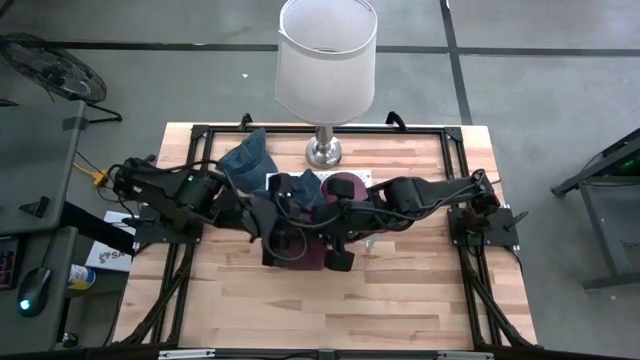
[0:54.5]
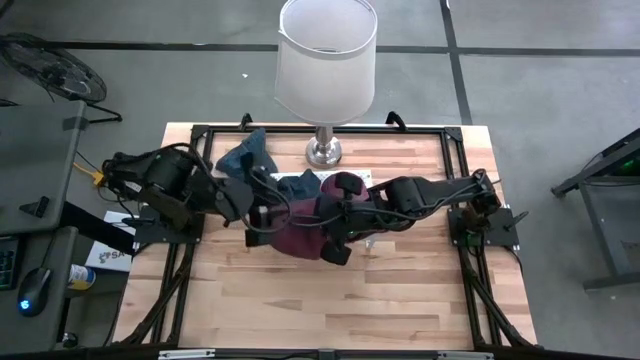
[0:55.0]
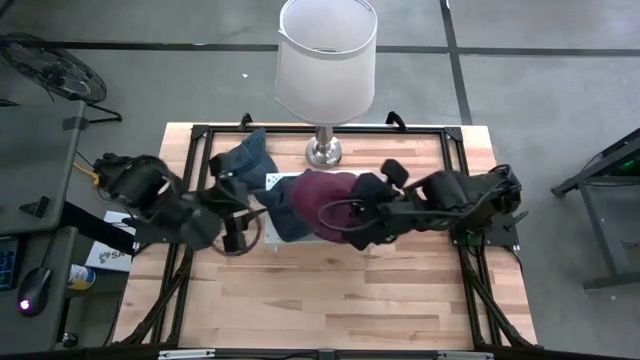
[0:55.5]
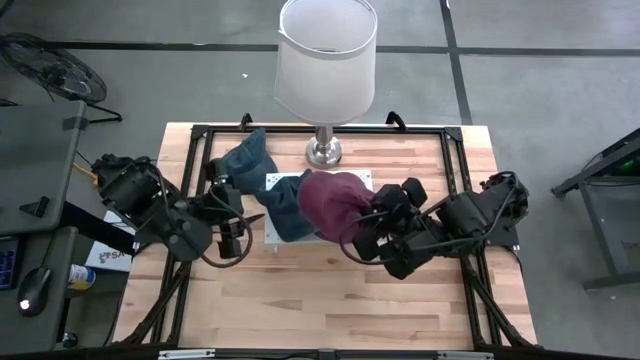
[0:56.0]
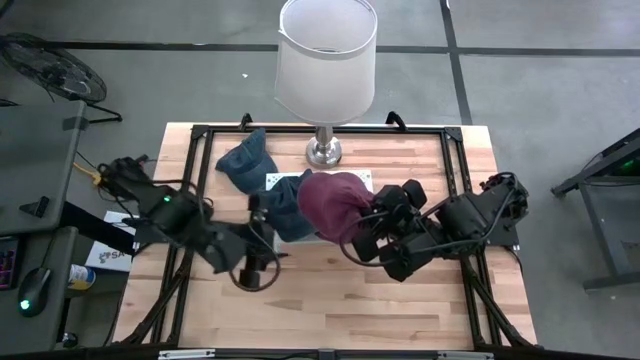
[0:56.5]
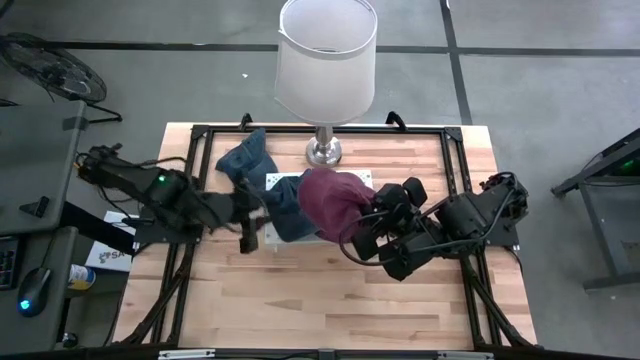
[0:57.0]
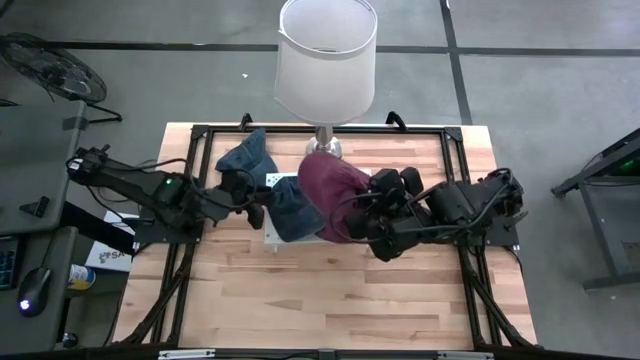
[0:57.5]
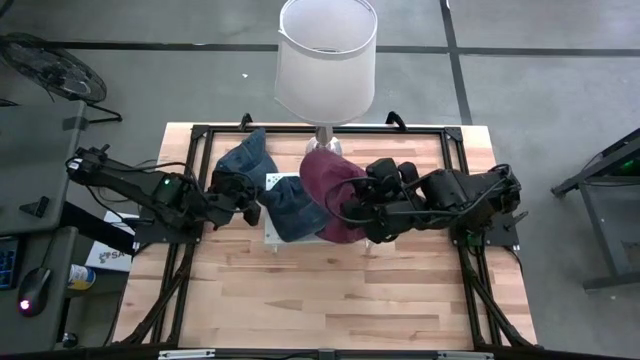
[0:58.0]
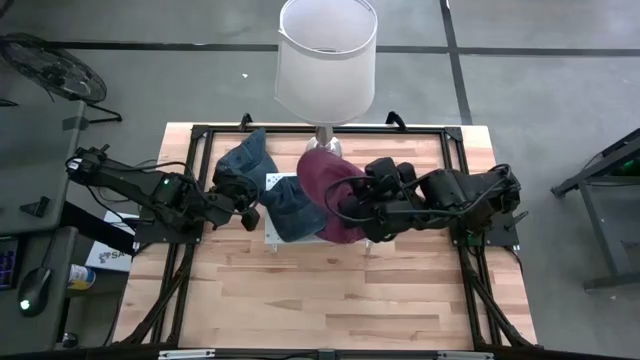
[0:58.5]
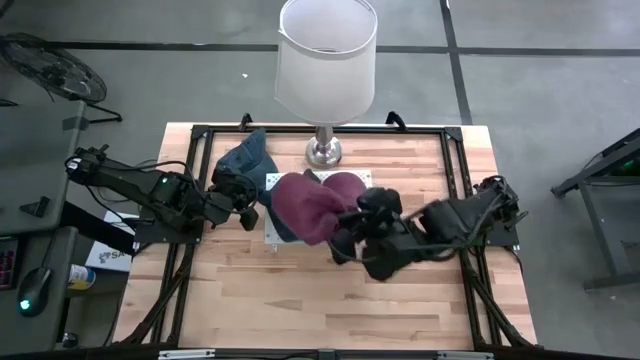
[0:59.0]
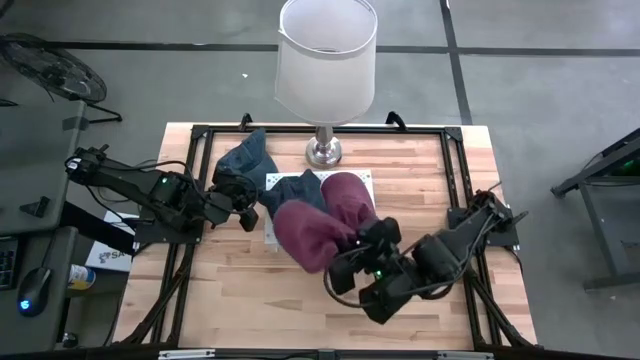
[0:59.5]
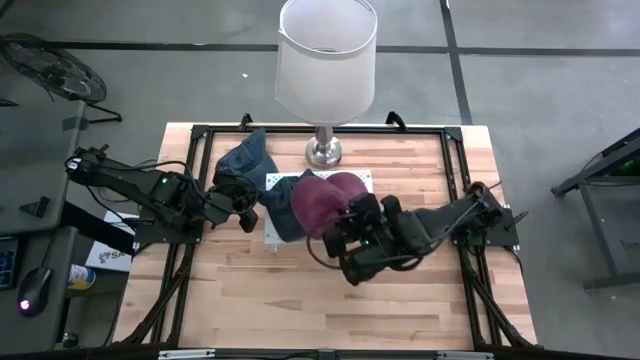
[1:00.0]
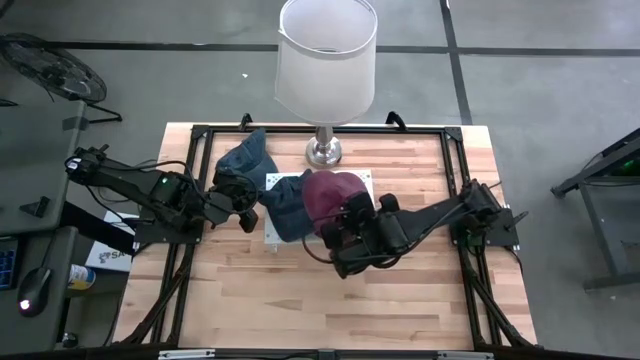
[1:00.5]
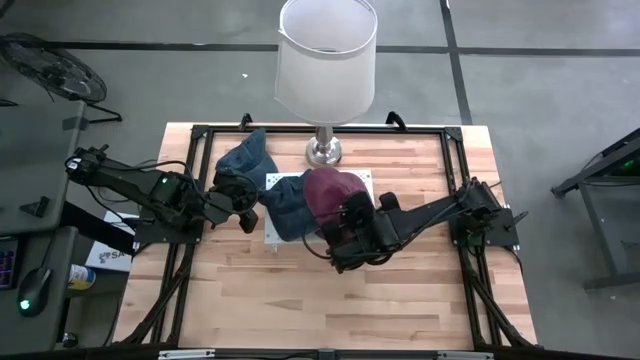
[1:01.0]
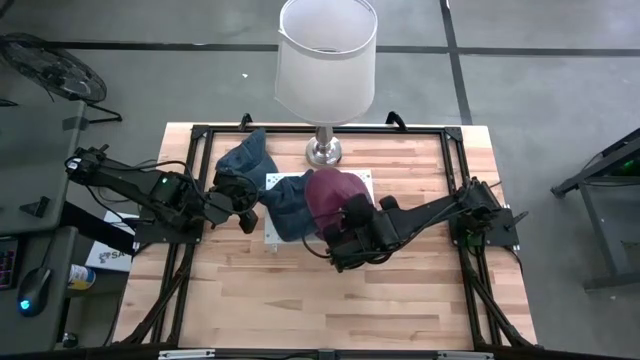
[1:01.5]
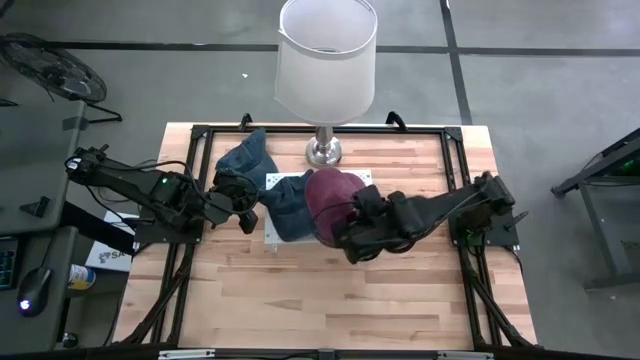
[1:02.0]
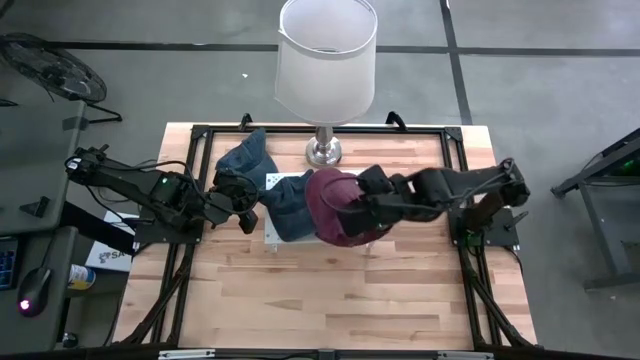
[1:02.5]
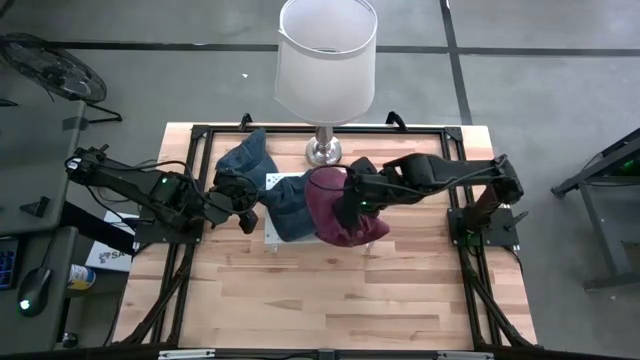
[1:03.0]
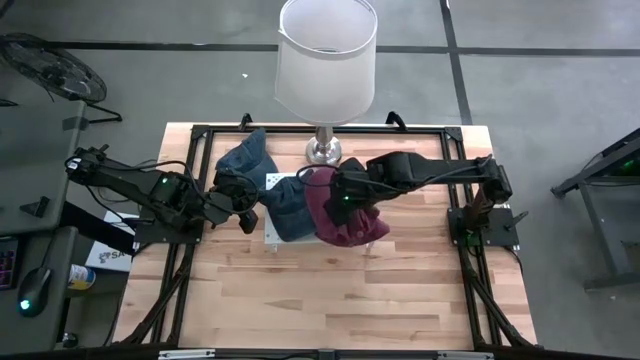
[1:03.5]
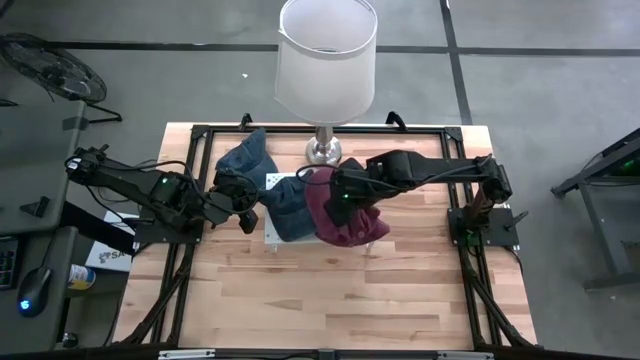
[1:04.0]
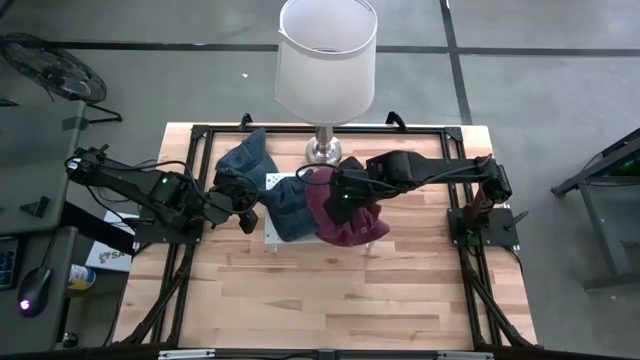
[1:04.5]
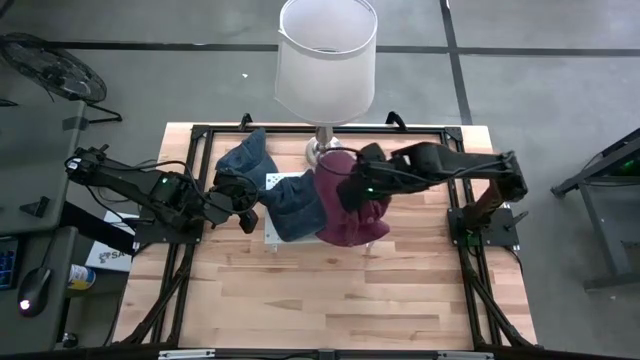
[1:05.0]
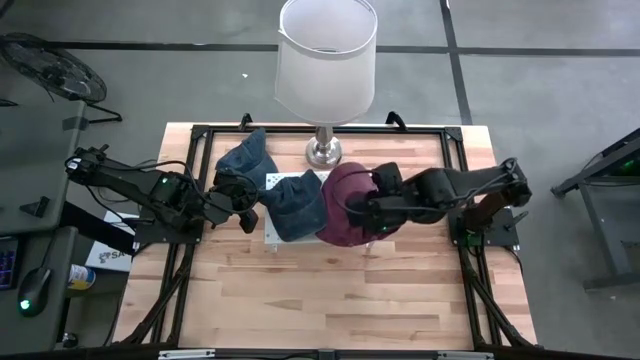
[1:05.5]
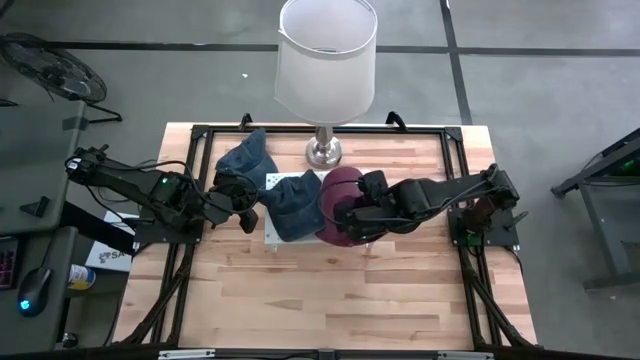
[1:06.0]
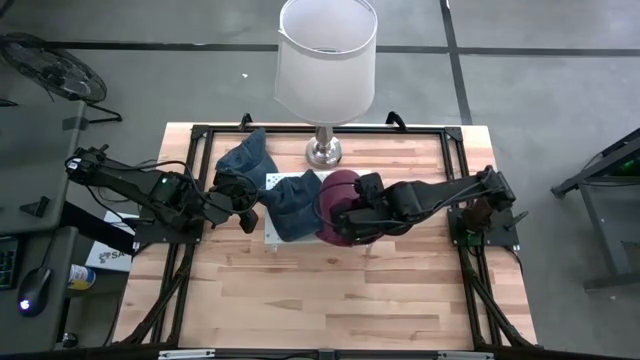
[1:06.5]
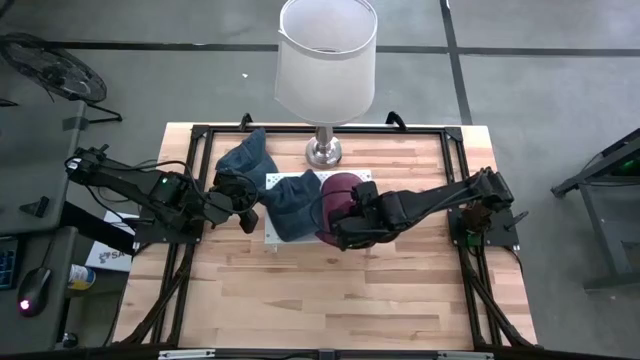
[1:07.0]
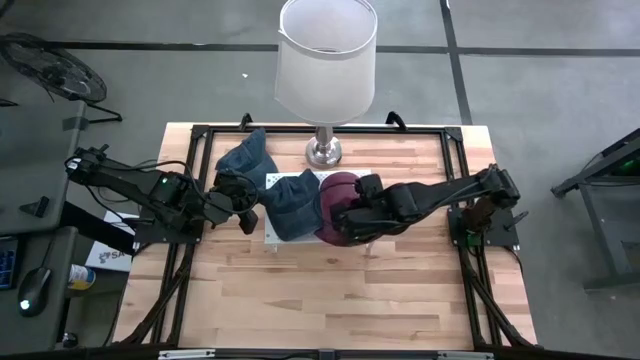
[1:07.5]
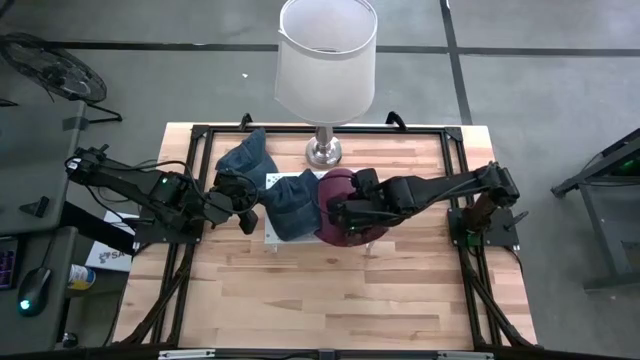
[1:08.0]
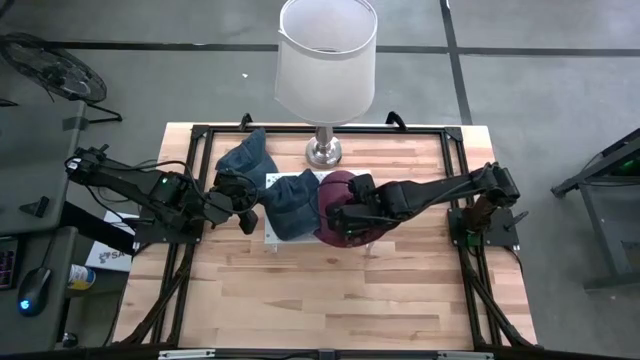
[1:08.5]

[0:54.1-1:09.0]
Task: Pick & Place hat
Stack the red cap on top of the other red cap on the shelf

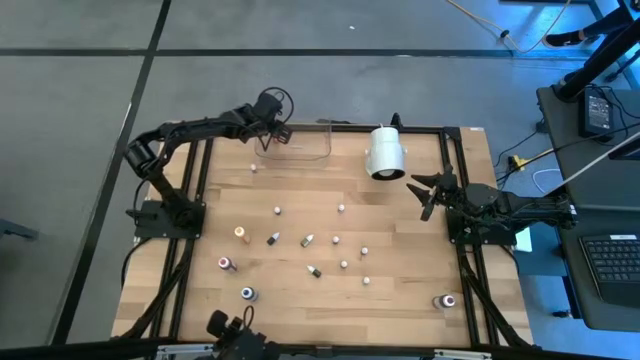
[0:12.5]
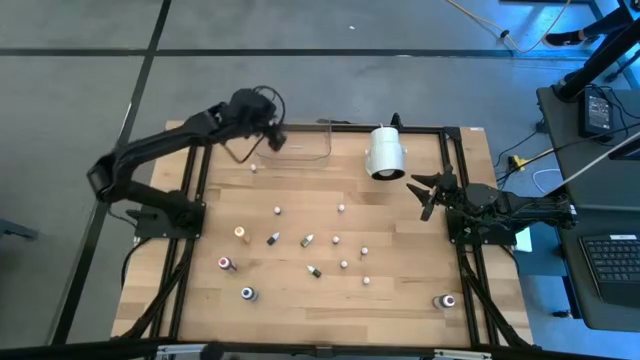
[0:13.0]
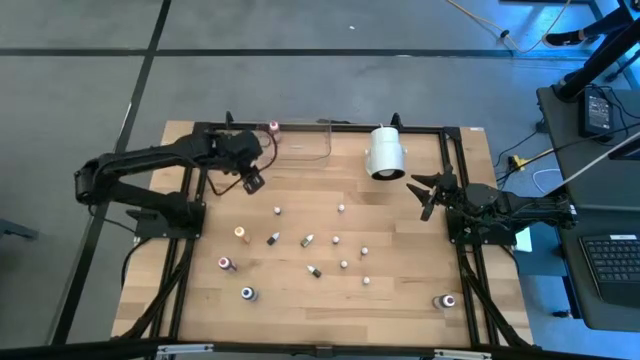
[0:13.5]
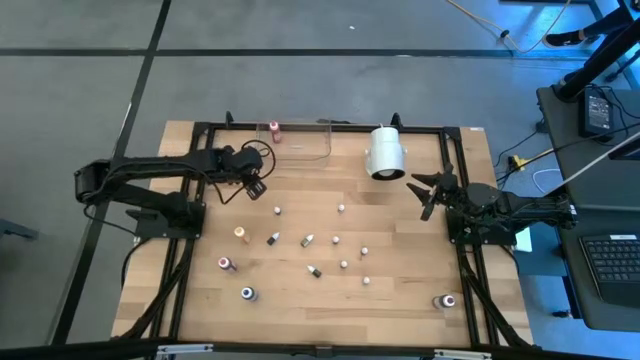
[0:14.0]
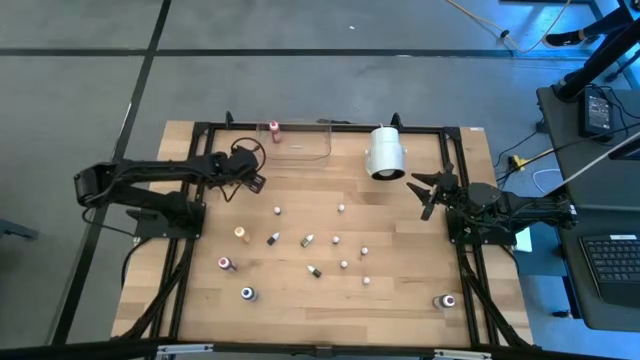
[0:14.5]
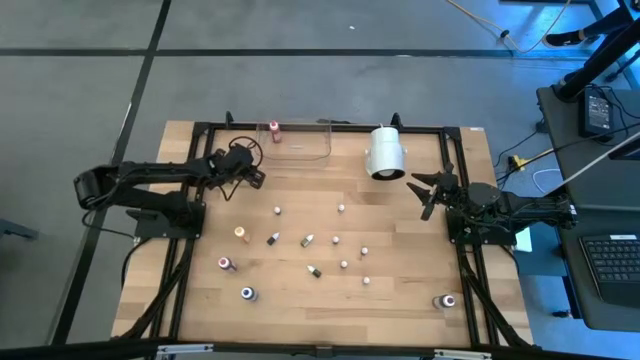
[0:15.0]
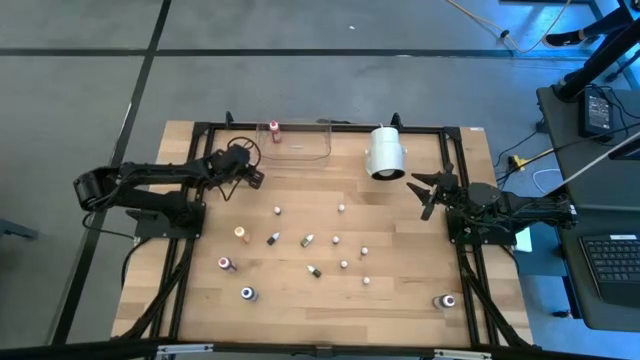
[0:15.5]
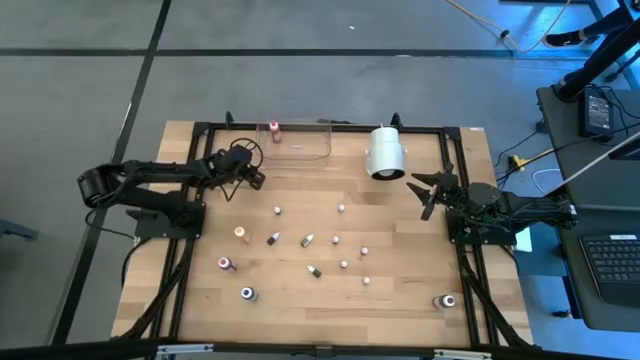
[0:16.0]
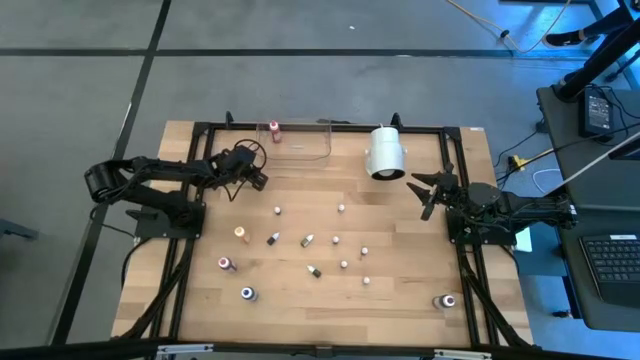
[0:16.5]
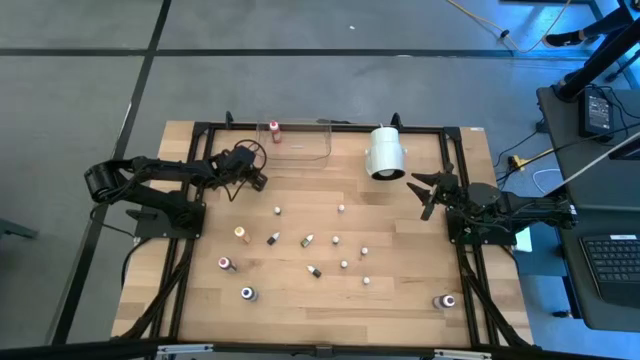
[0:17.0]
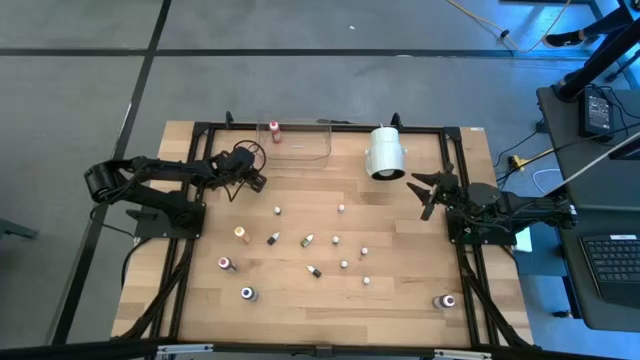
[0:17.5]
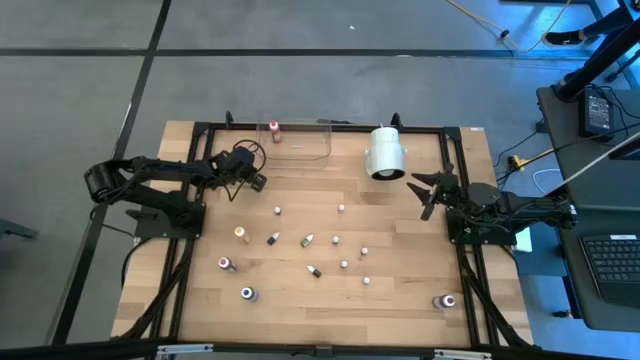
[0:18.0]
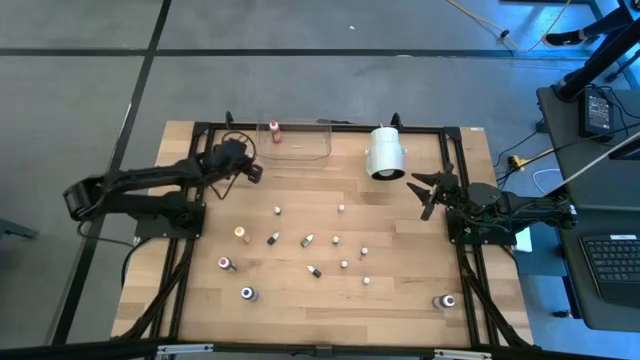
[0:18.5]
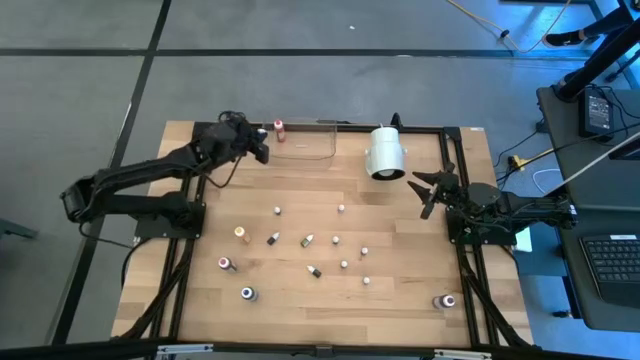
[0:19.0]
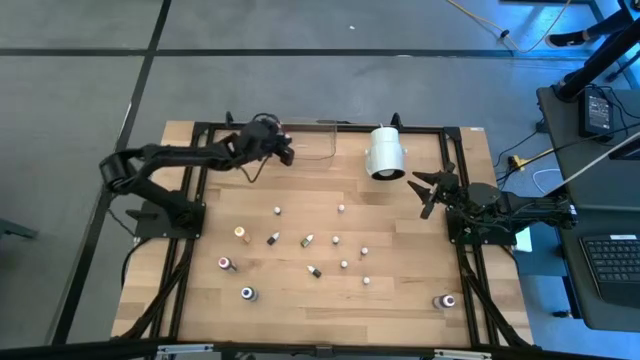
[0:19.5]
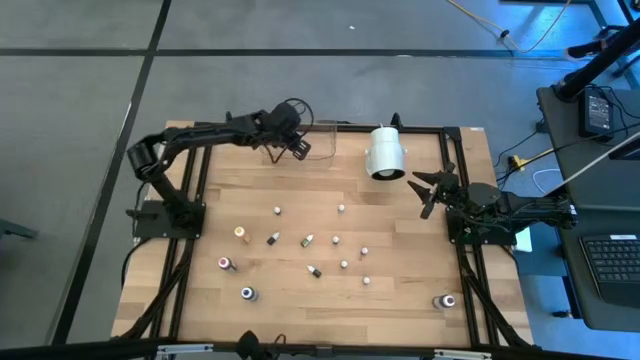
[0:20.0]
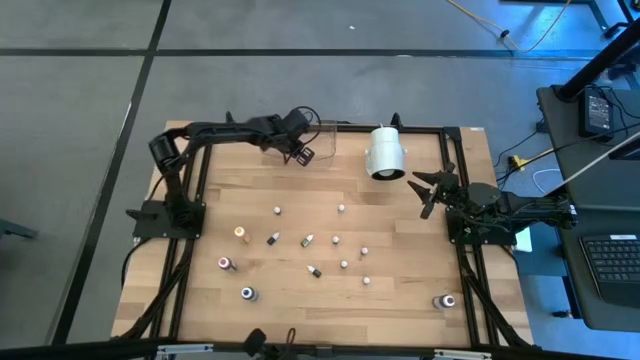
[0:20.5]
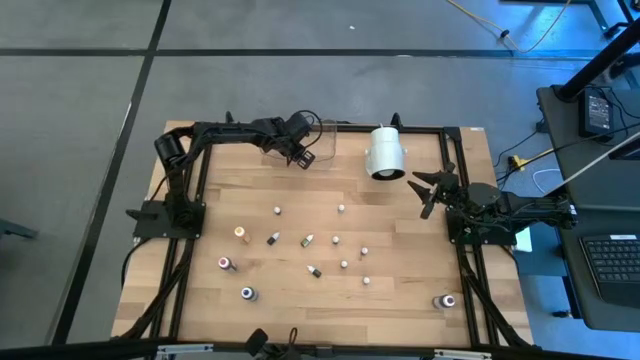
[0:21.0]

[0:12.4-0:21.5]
Task: Pick & Place food coloring
Put the red food coloring bottle into the transparent bin
